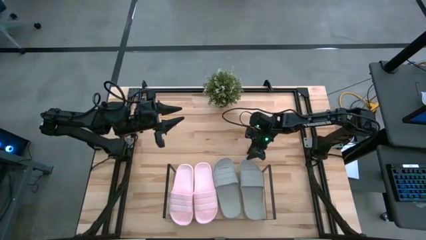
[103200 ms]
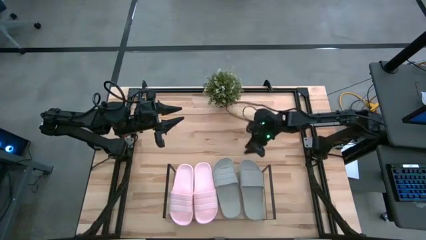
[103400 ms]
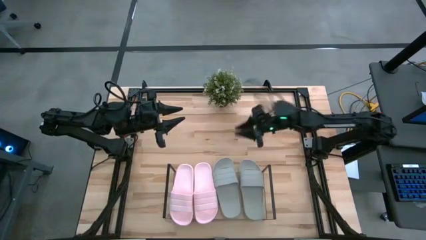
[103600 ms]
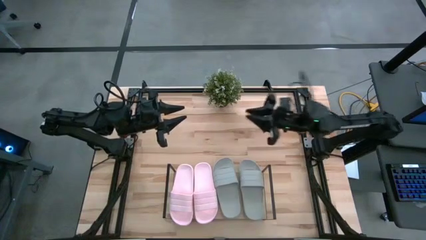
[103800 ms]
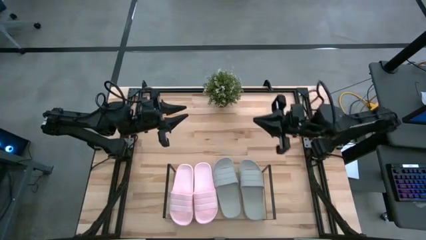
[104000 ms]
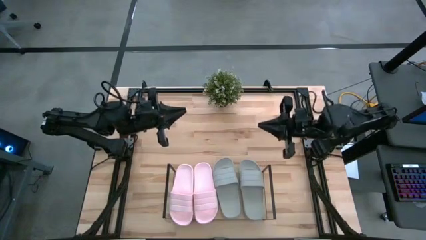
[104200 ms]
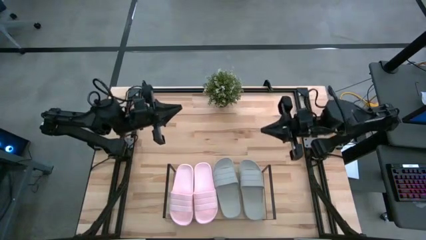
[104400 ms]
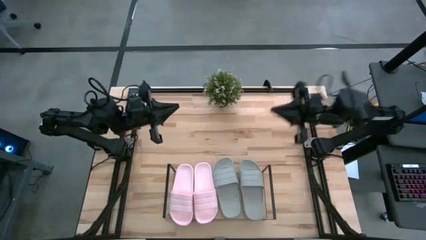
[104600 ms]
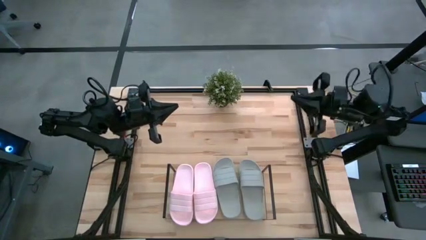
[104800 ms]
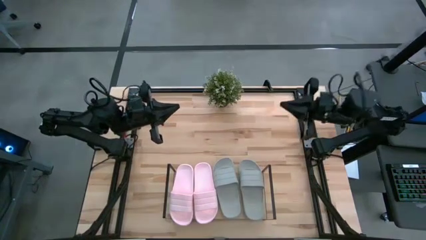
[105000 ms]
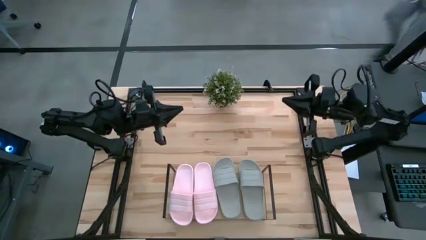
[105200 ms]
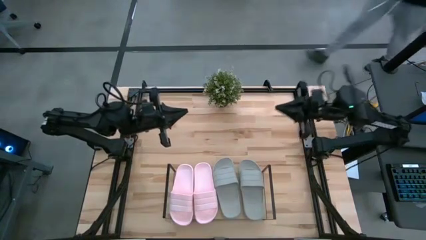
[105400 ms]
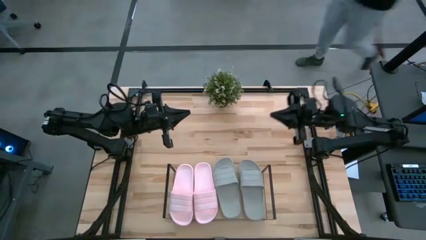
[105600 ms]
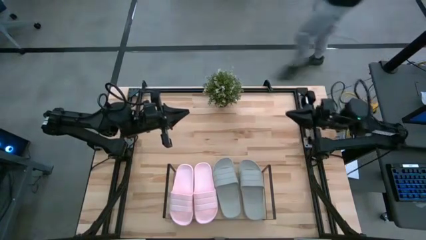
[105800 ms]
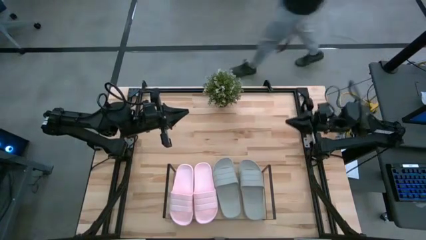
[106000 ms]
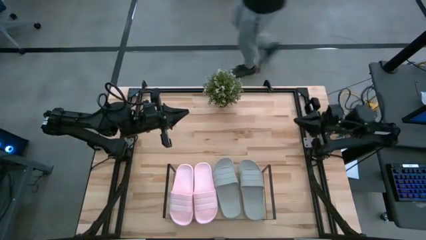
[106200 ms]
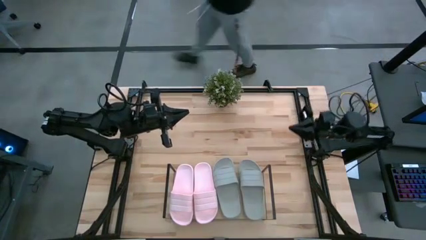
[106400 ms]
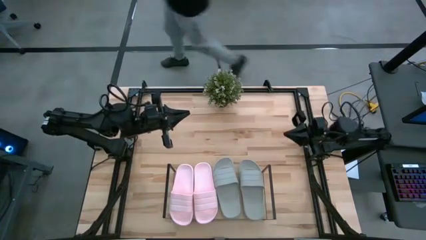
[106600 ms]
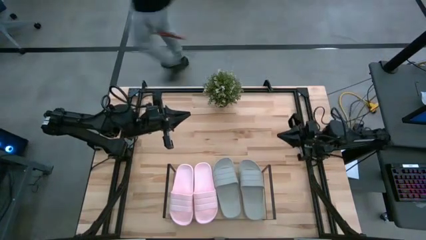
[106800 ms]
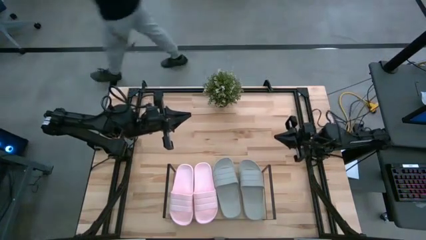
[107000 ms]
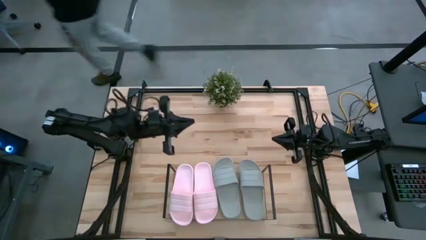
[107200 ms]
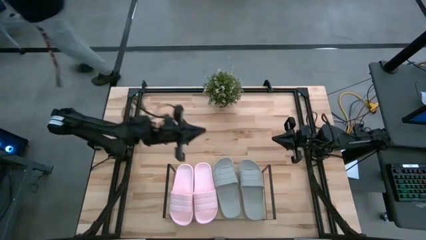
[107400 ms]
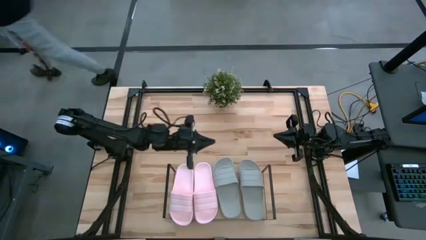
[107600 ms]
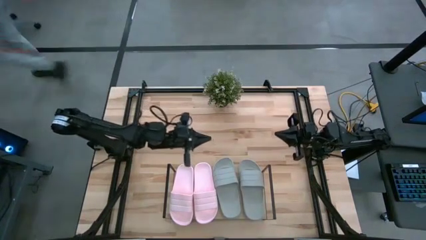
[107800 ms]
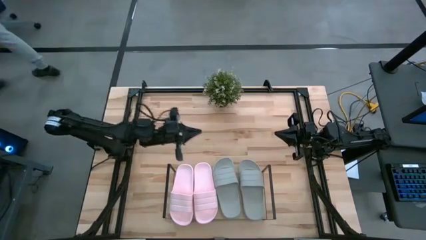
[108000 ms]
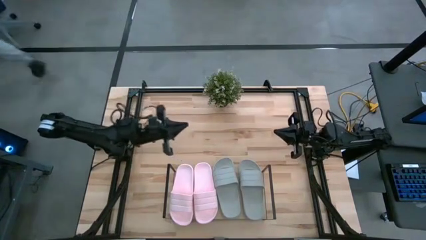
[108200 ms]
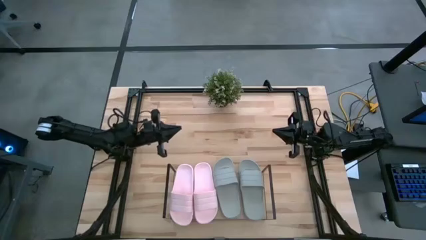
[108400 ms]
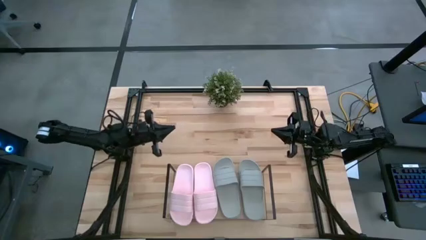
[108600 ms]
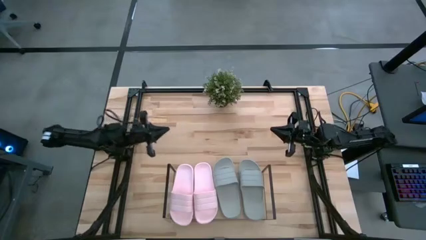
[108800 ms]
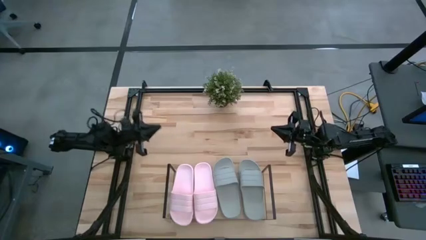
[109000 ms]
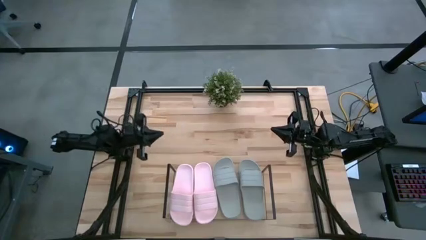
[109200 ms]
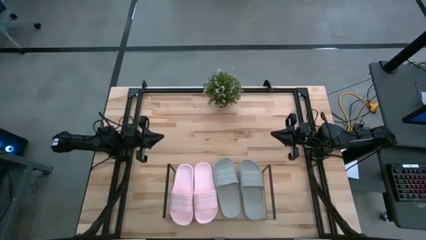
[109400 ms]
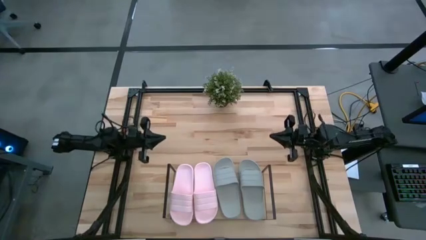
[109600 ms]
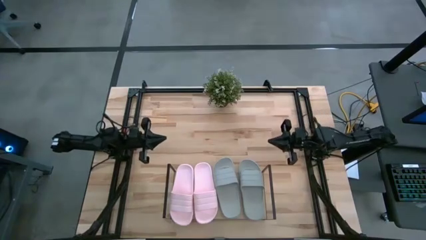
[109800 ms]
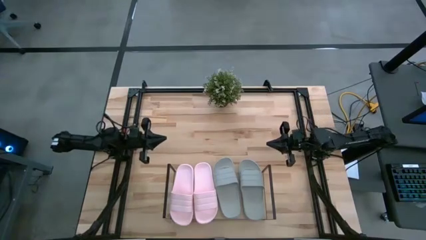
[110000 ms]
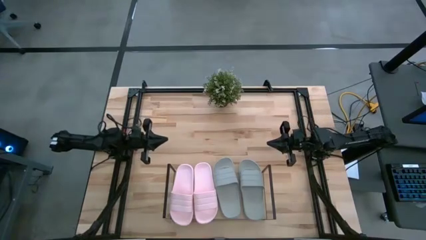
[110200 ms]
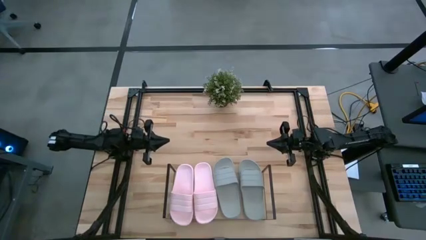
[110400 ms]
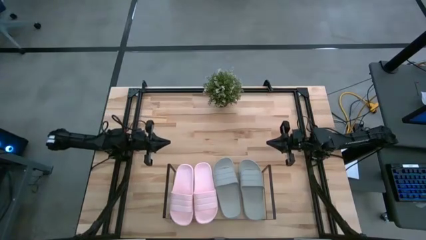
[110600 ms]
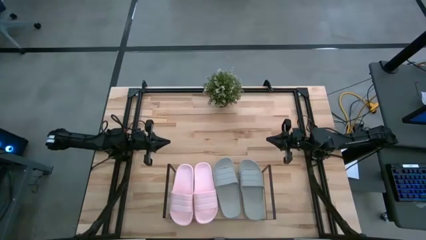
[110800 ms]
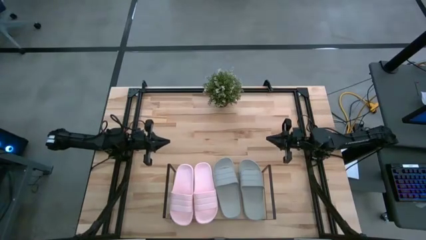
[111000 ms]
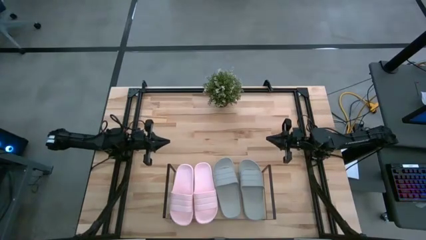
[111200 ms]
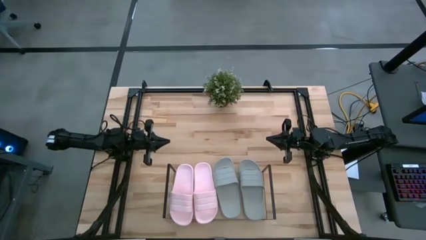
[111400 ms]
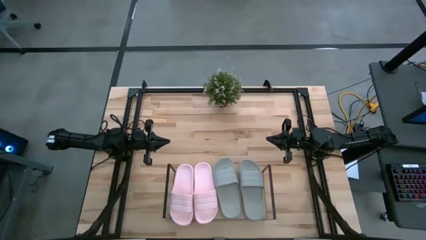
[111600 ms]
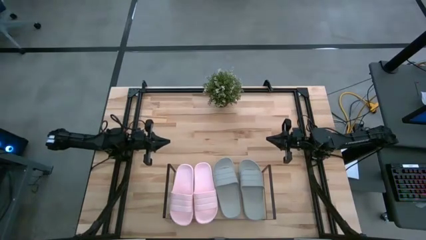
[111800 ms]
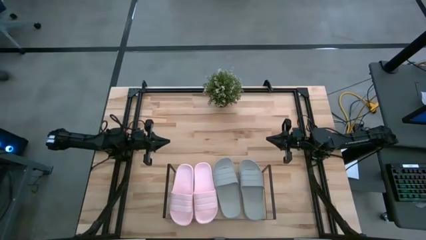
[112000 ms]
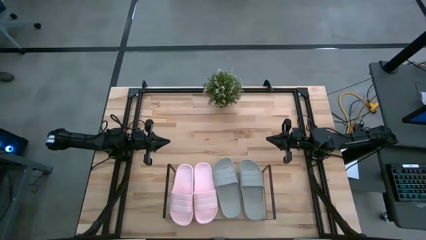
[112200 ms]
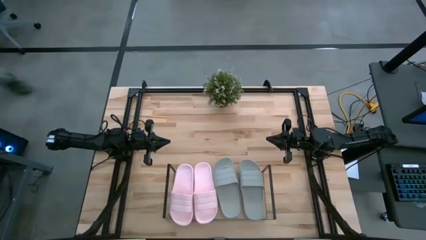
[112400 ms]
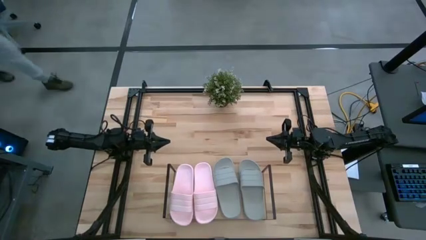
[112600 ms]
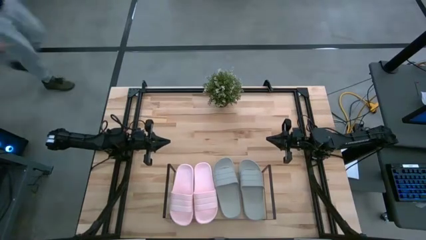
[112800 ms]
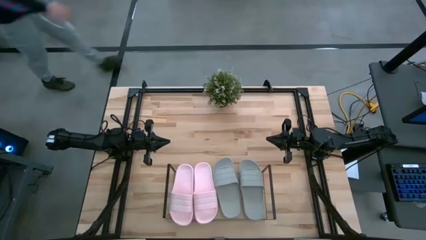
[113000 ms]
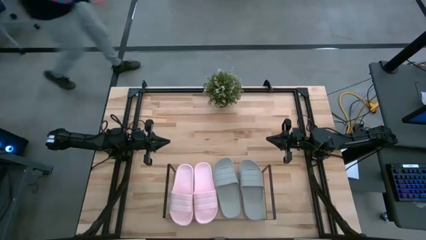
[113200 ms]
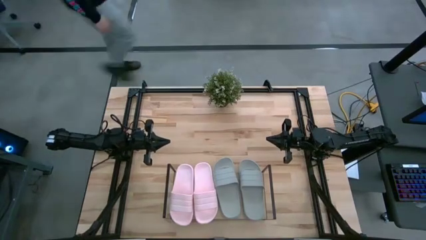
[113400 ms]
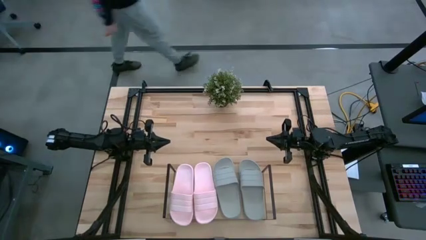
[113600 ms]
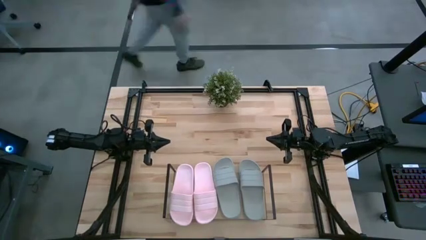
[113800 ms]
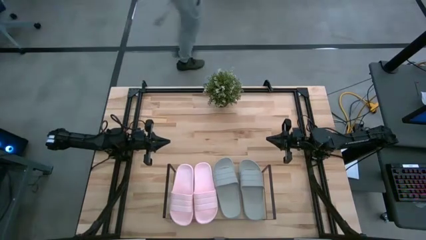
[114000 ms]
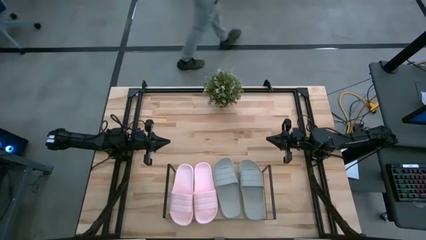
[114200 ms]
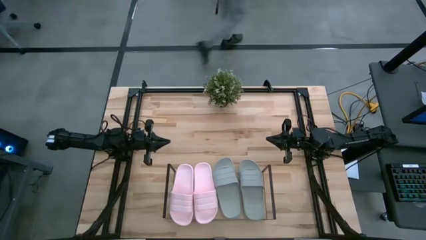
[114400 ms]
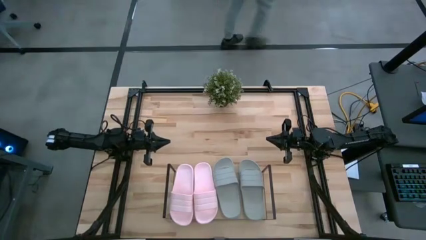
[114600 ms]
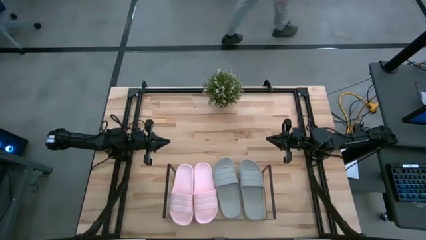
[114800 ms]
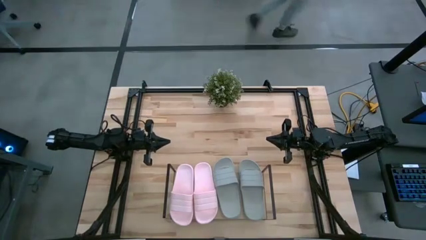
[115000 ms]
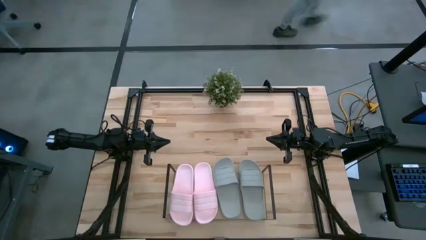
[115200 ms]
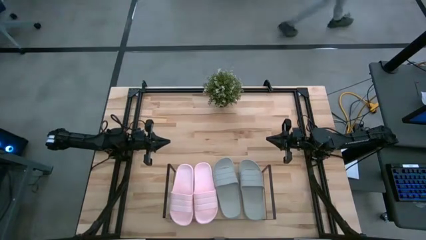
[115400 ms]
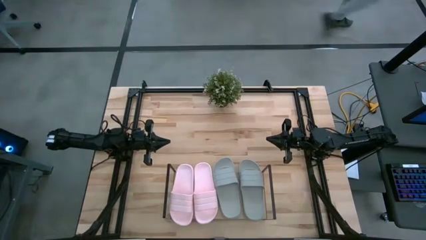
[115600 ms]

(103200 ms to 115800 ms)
Task: Pick and place slides into the shelf
Return to Home Position
